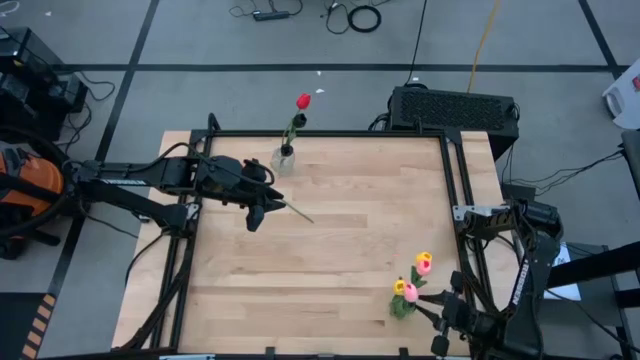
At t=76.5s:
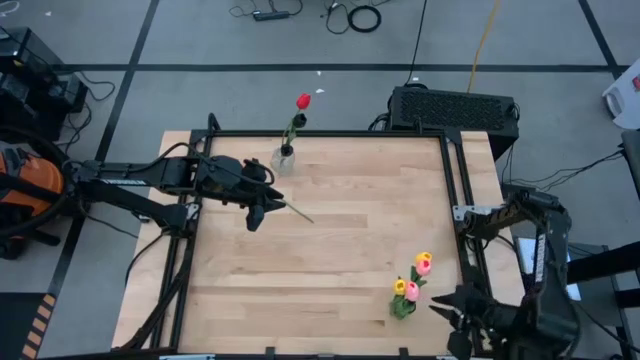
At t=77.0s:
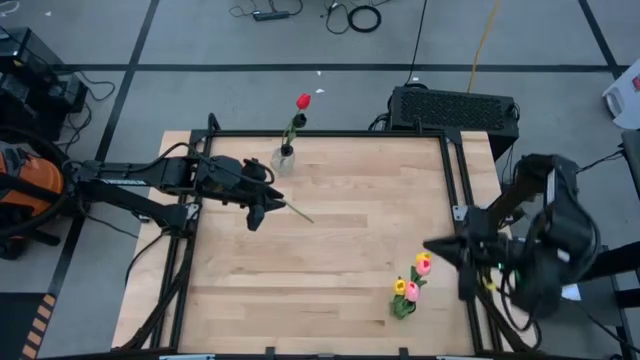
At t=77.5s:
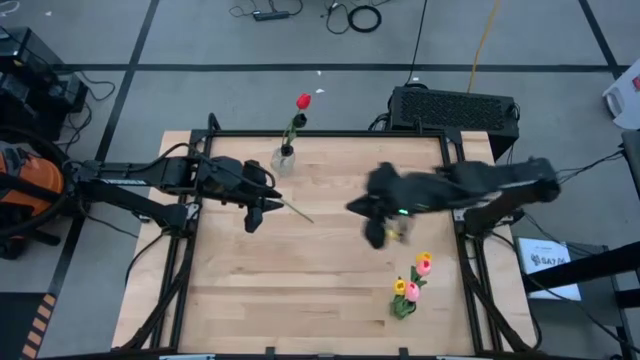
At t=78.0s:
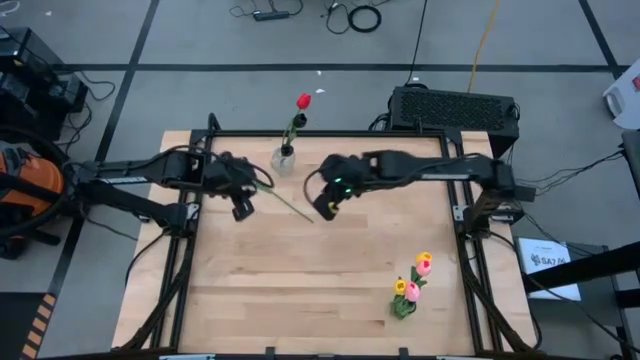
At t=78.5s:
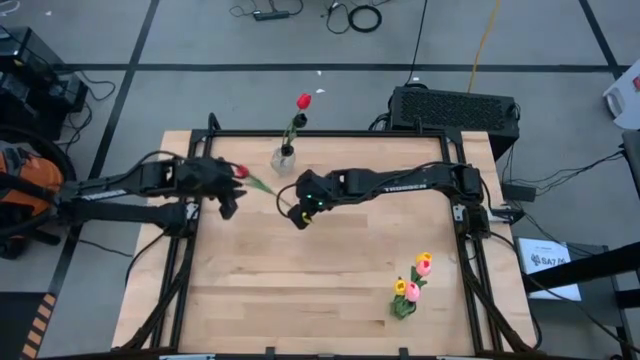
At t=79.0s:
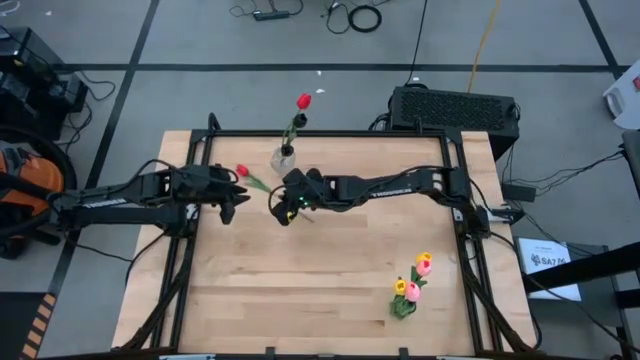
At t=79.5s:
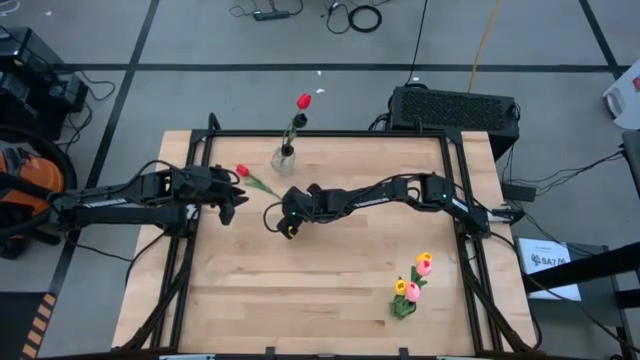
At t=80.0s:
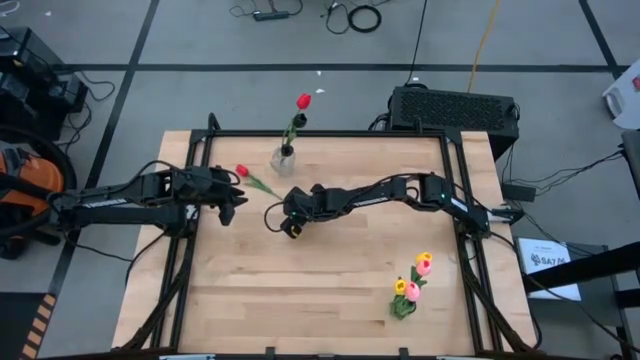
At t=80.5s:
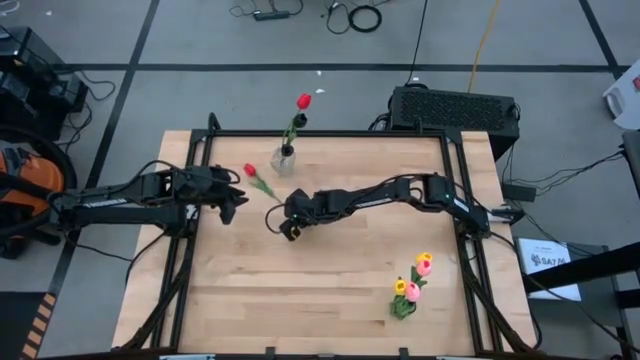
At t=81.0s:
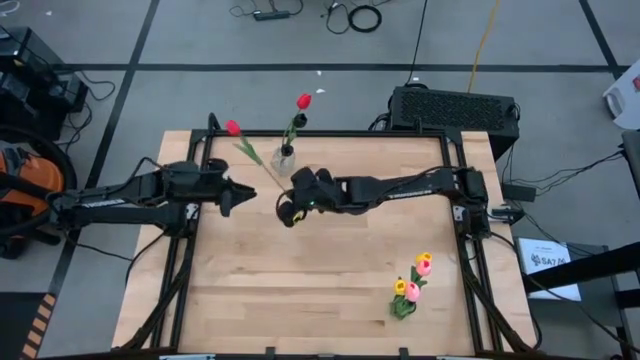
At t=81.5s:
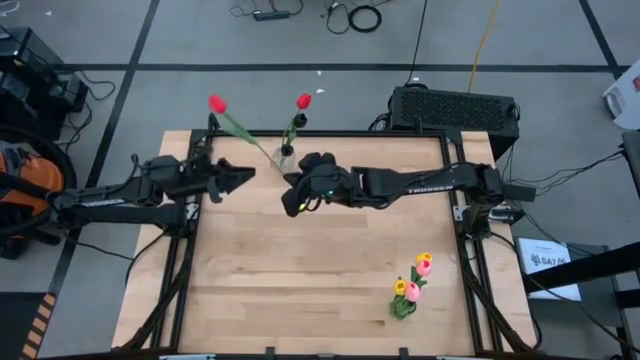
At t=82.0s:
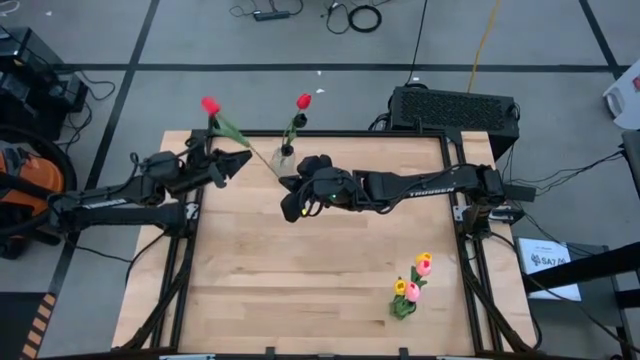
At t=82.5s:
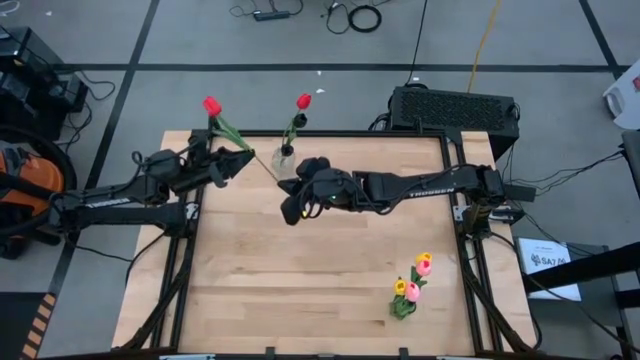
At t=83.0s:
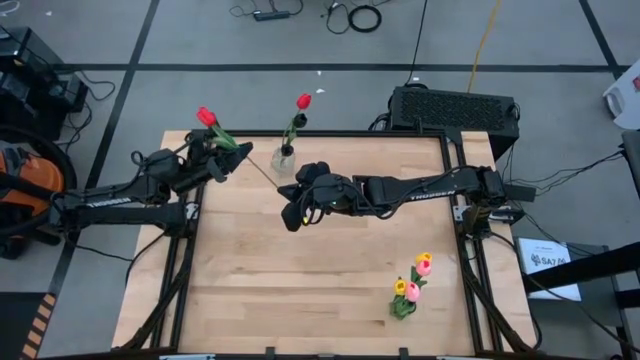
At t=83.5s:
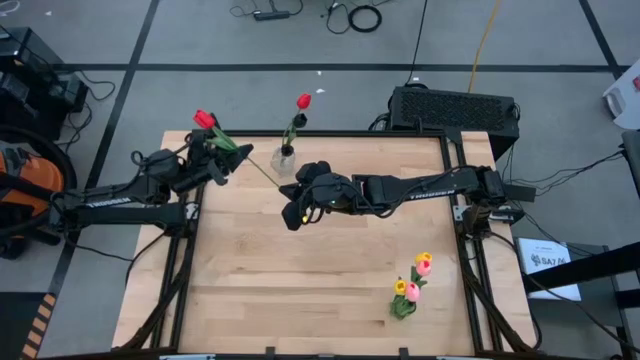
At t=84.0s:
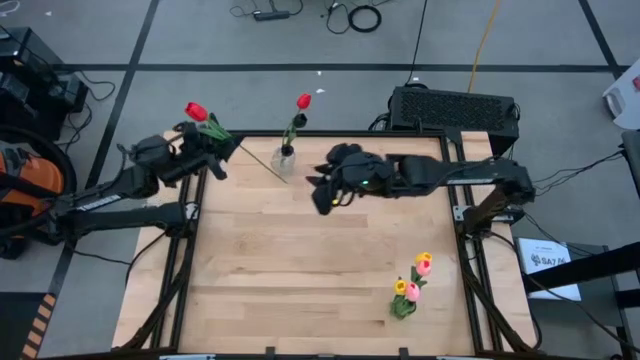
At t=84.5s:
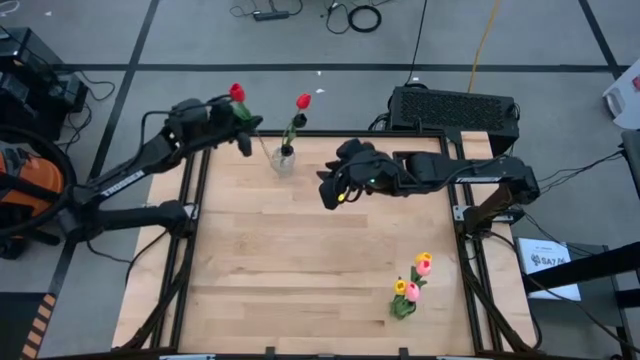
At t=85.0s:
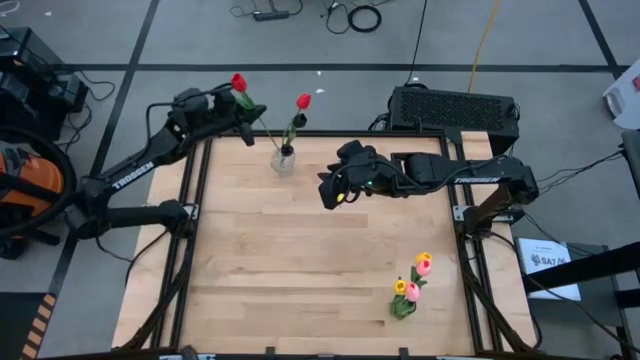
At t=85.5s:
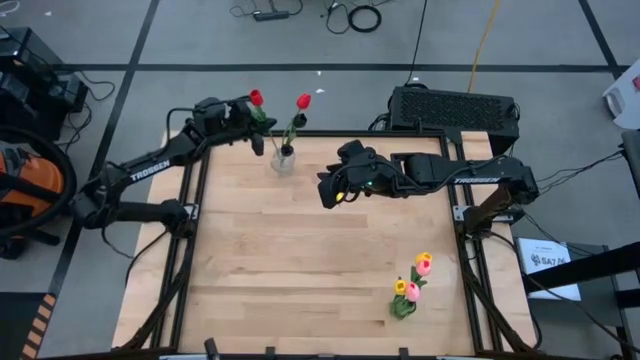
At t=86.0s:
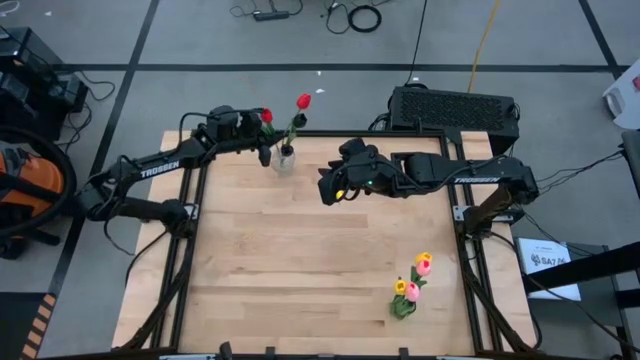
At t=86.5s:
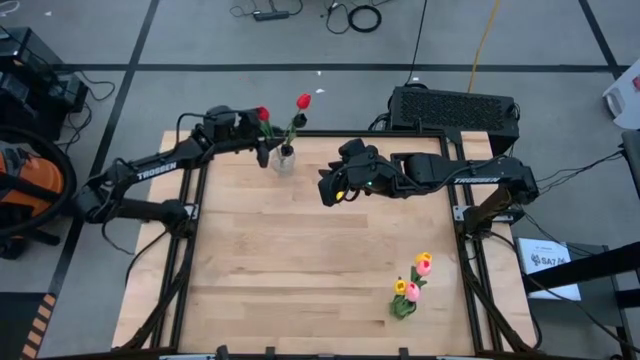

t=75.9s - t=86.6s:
Task: Sort flowers into vase by color
Put the red tulip into the transparent flower vase

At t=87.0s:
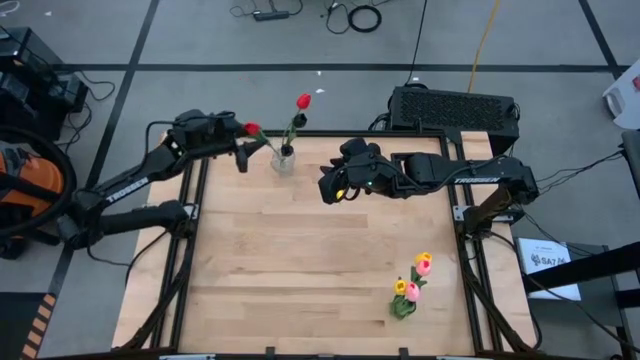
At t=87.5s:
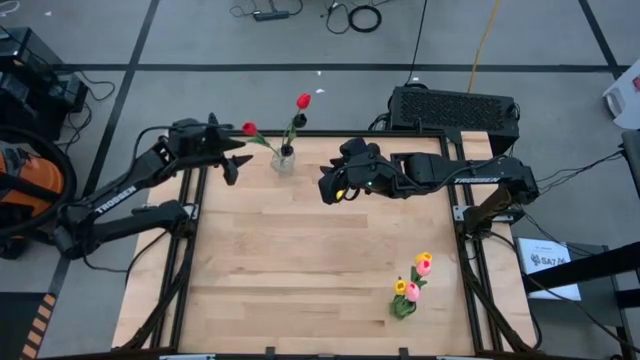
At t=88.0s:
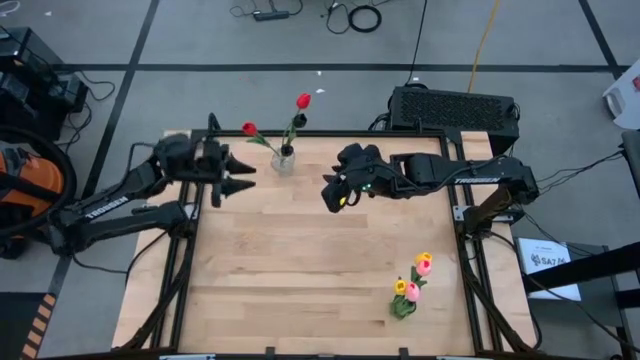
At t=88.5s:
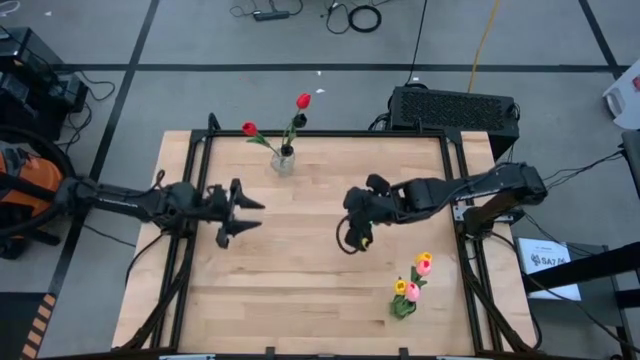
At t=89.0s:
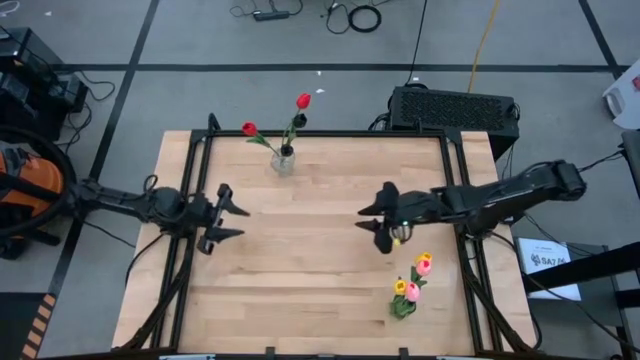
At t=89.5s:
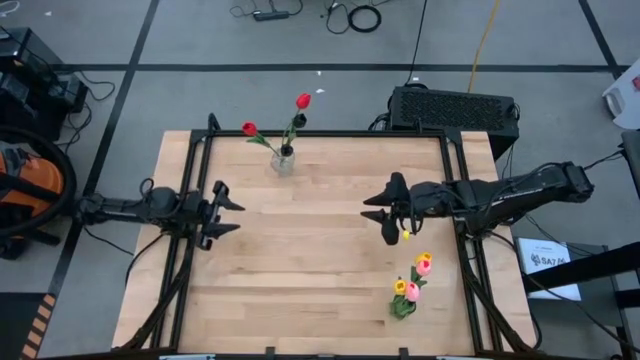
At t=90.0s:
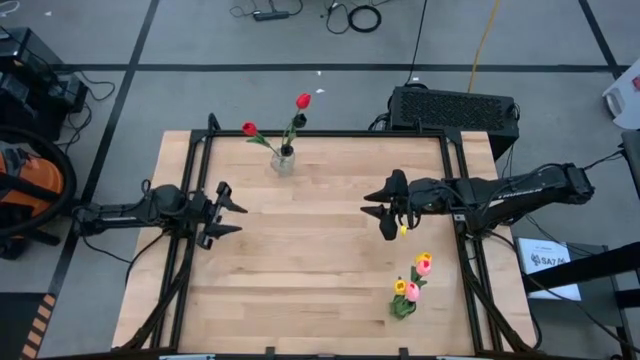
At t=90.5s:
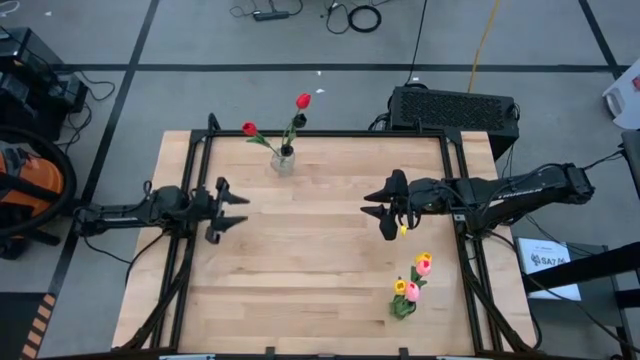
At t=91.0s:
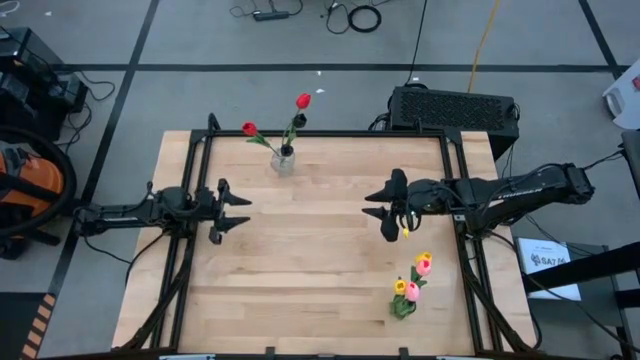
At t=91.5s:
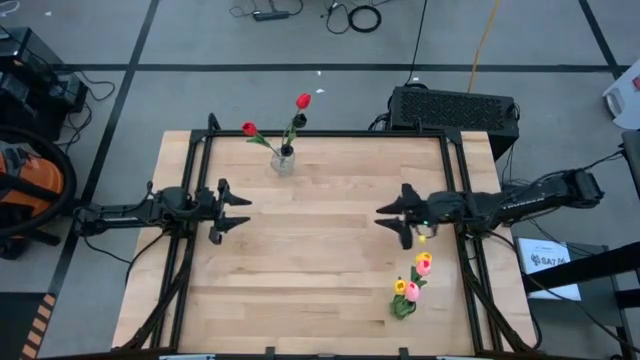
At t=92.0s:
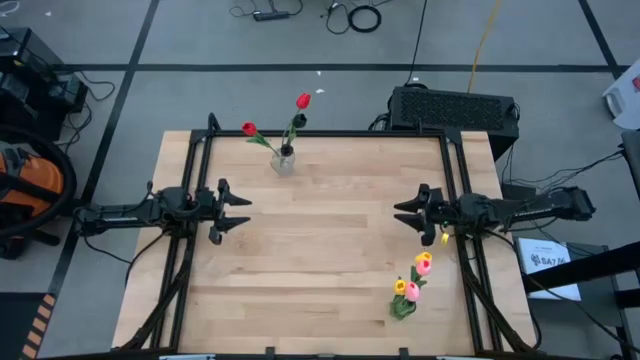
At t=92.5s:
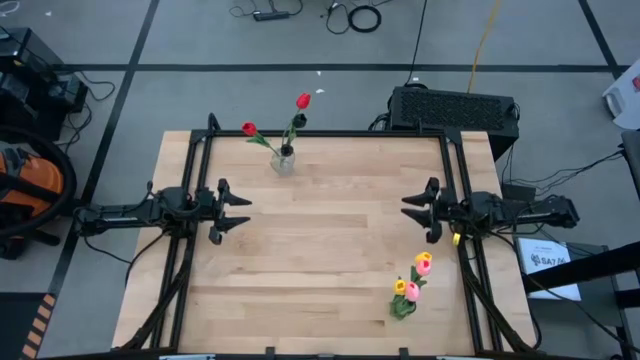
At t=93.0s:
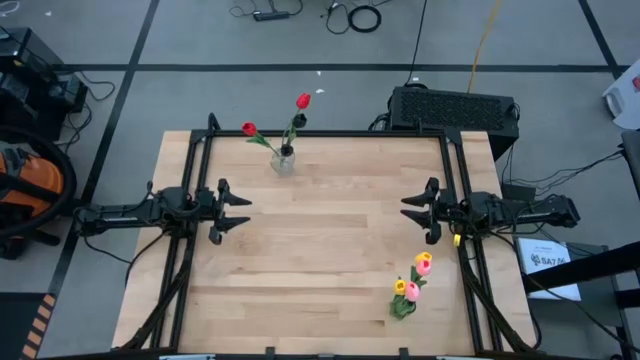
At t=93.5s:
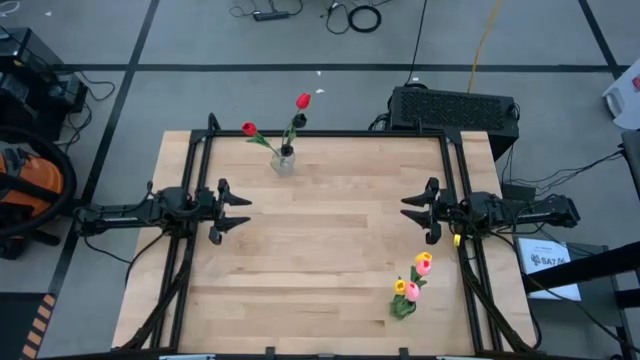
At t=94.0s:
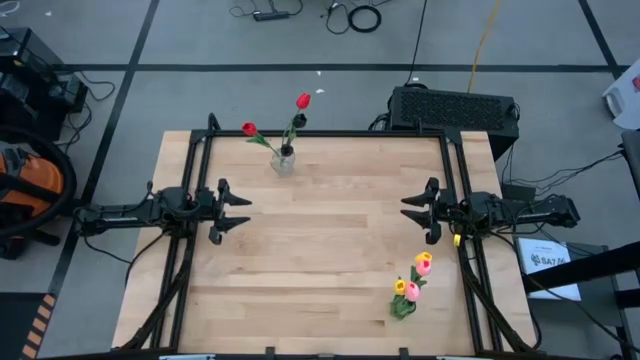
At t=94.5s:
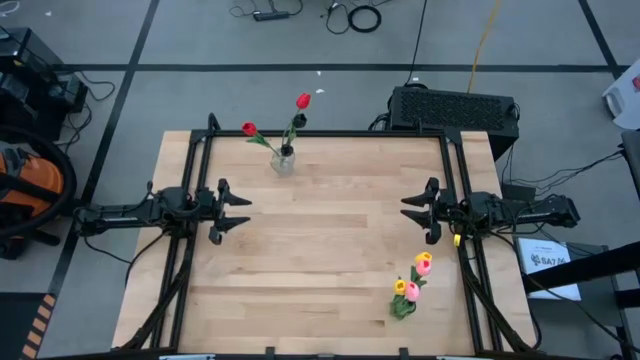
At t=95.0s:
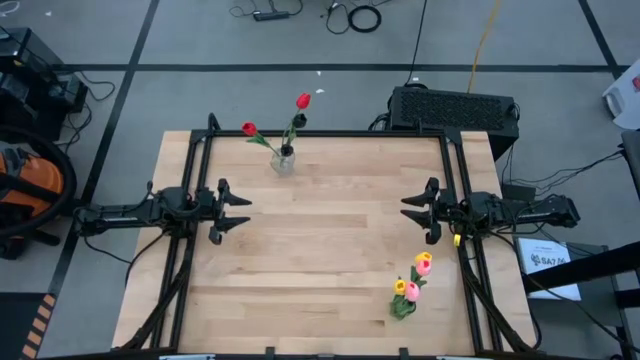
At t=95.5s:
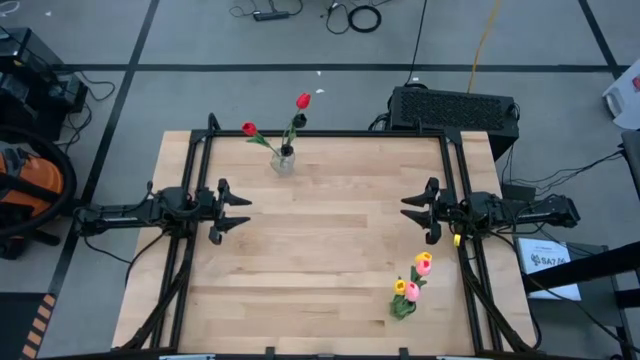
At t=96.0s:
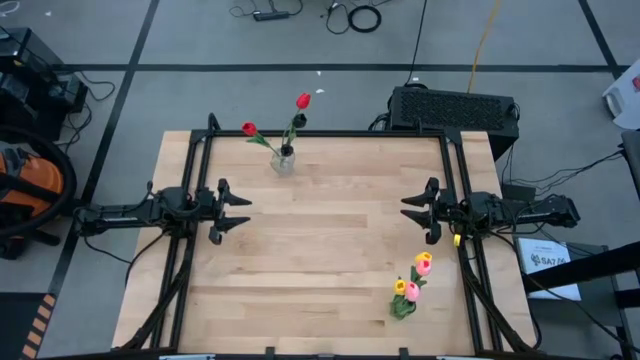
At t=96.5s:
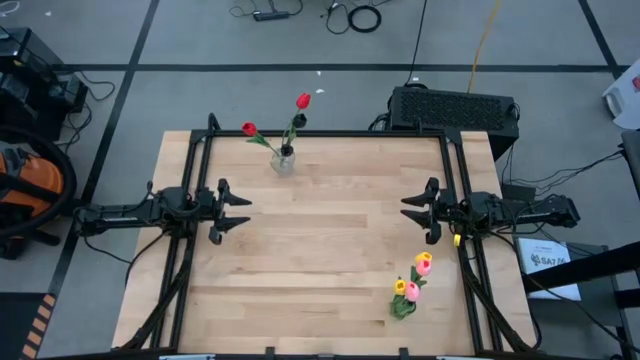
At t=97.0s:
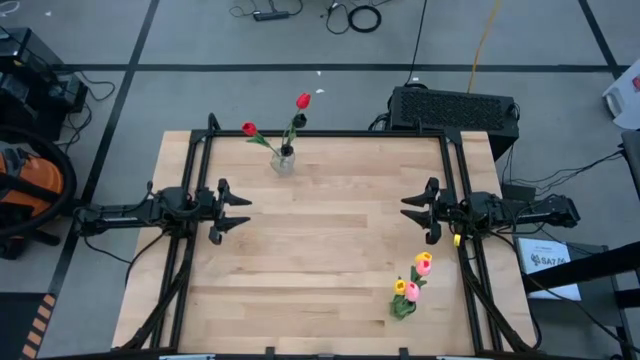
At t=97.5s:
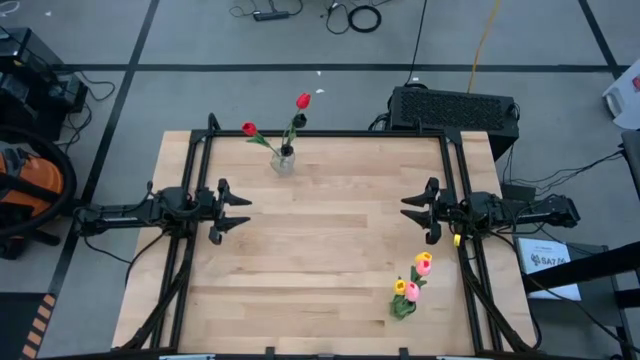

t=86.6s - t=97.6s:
Return to Home Position
